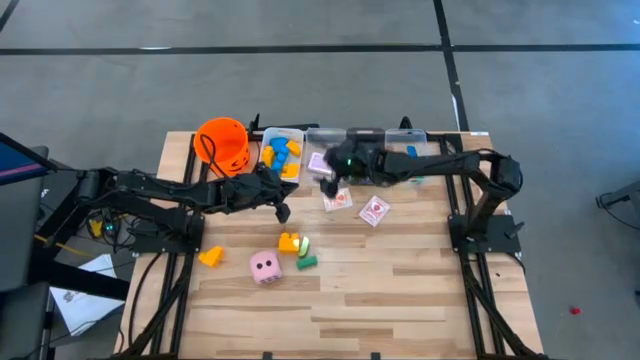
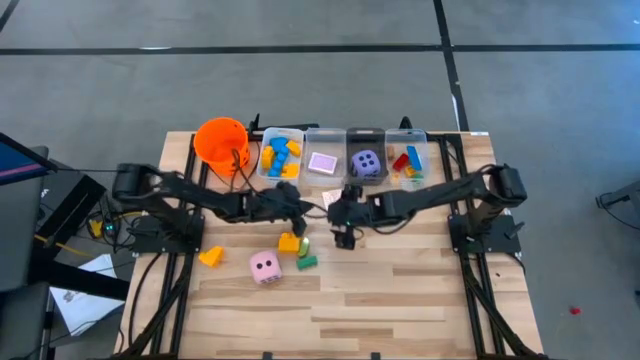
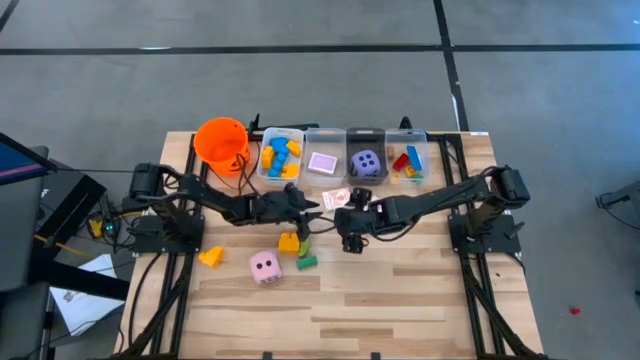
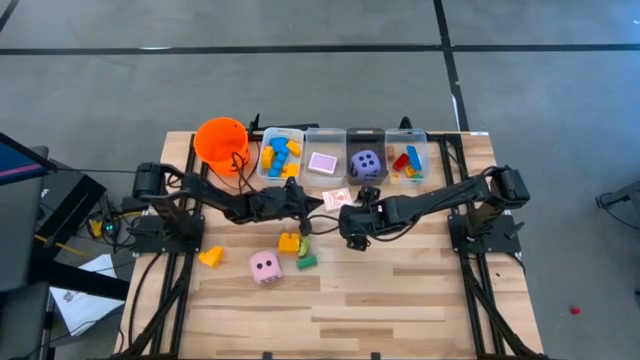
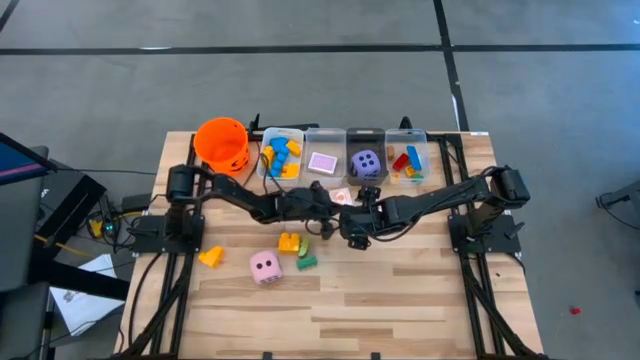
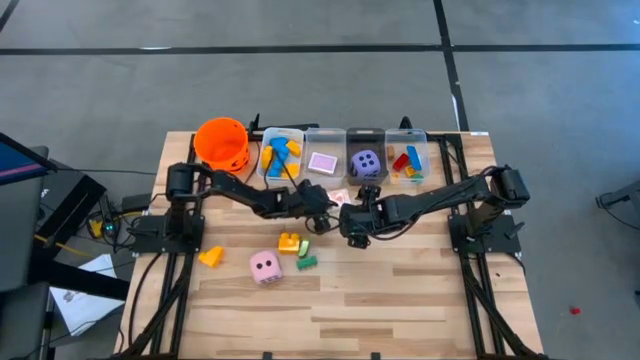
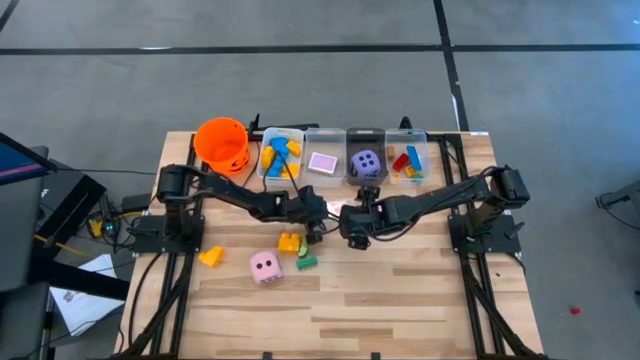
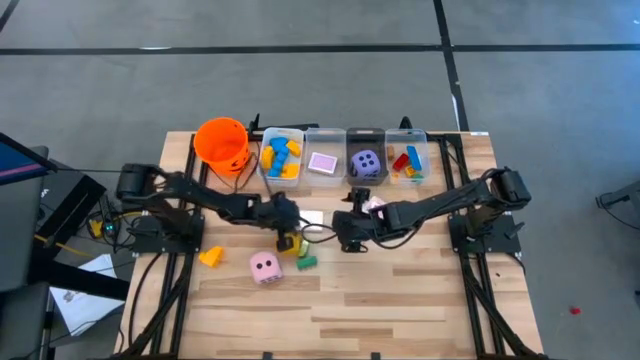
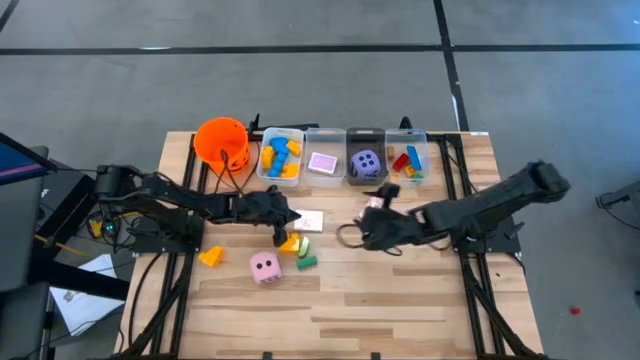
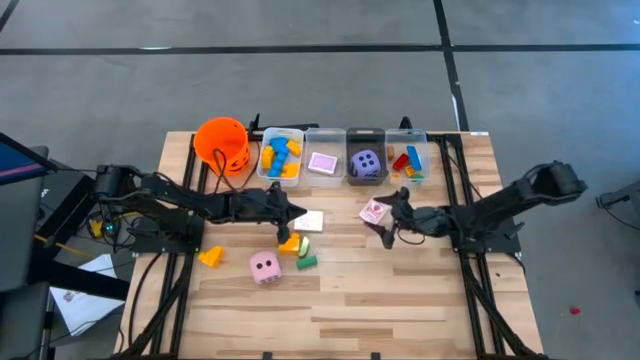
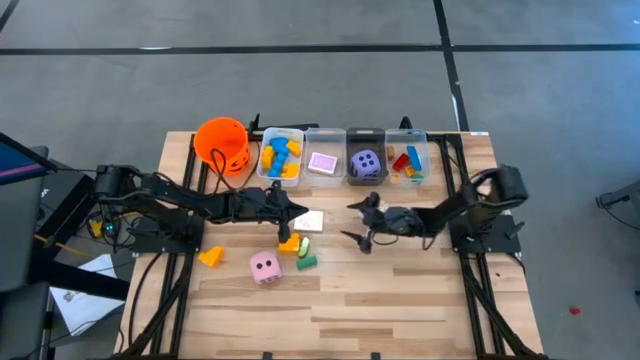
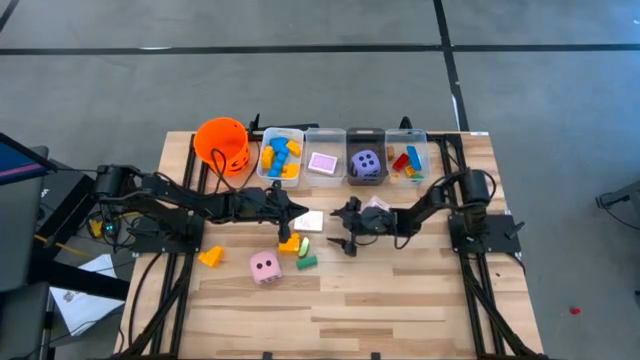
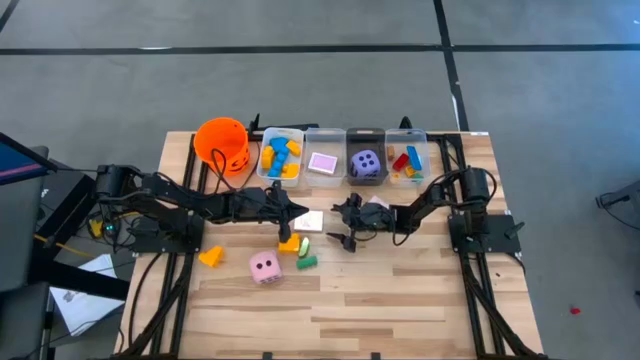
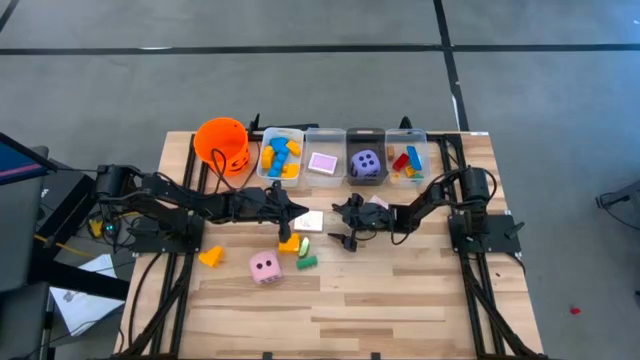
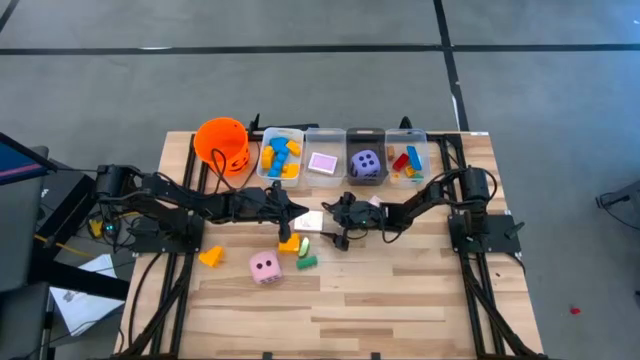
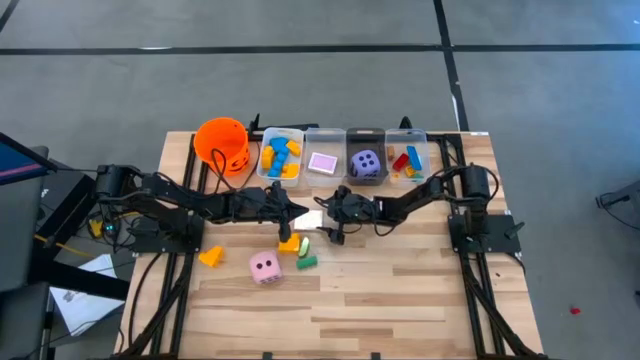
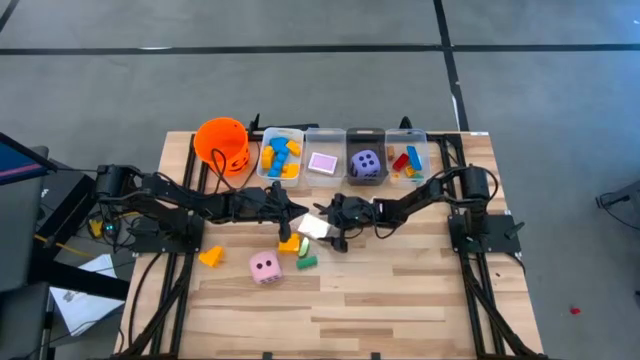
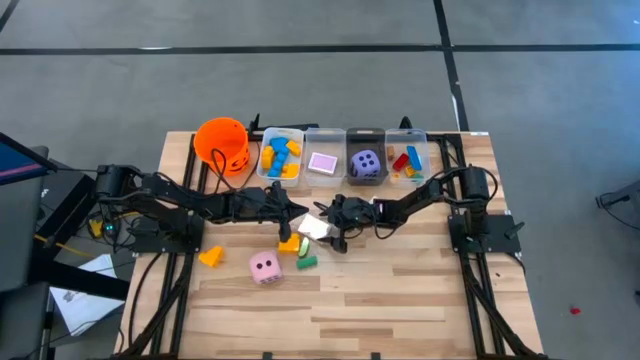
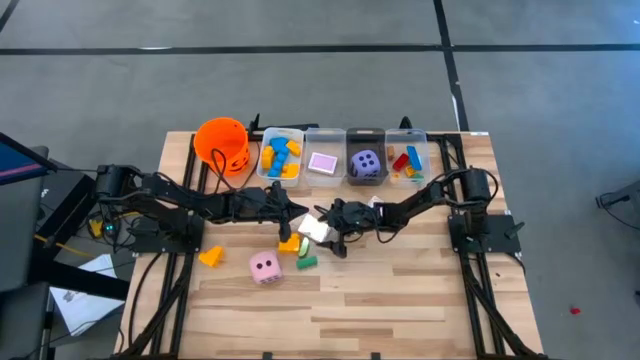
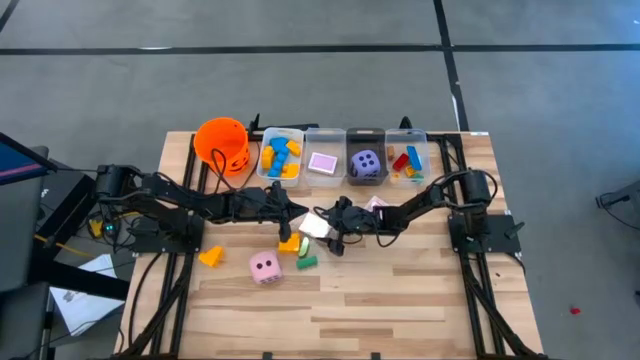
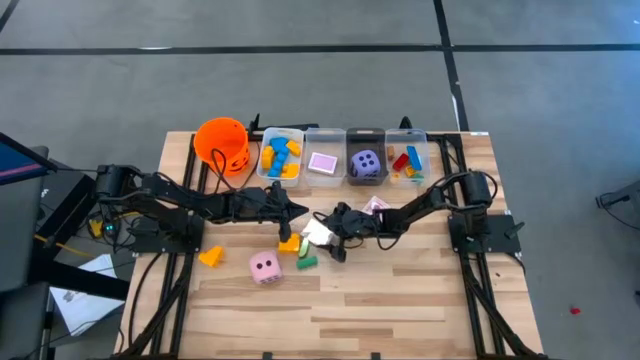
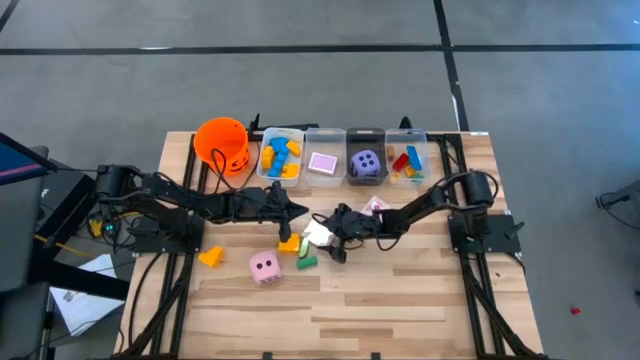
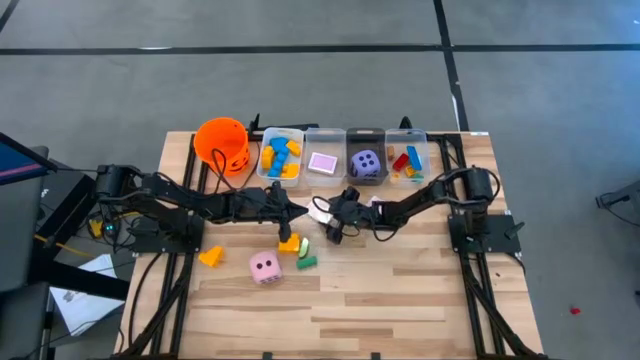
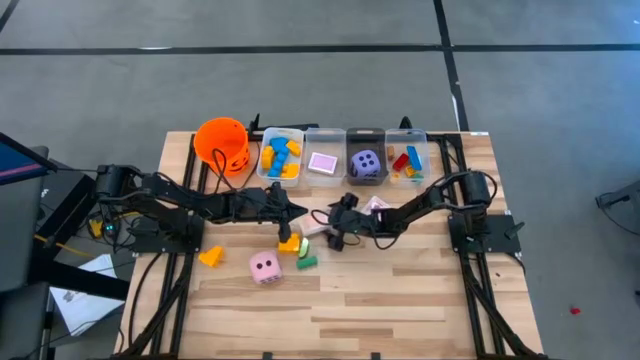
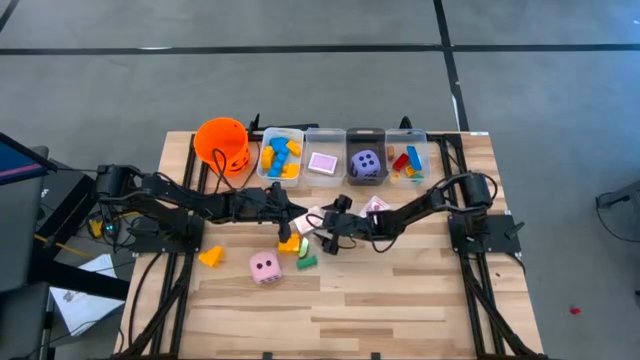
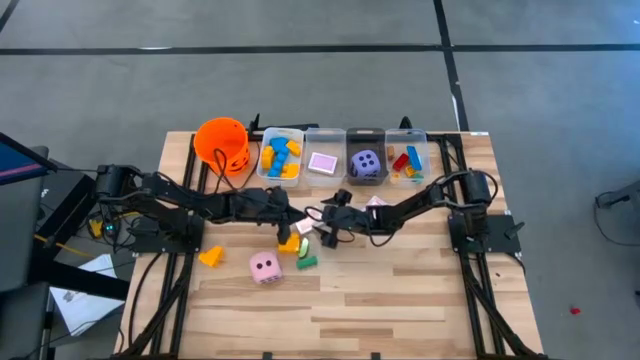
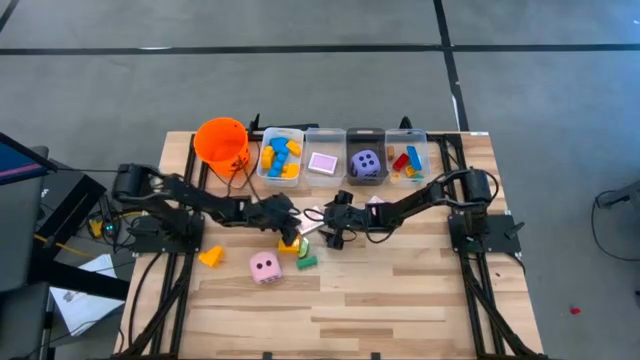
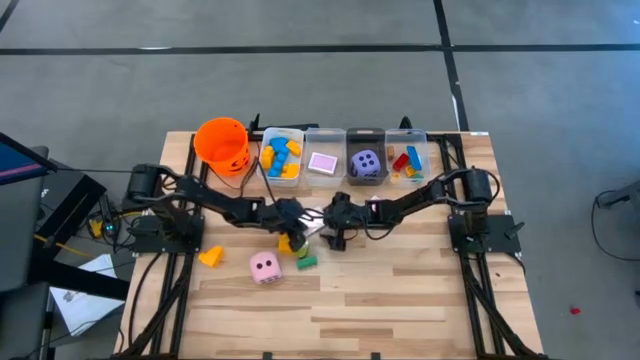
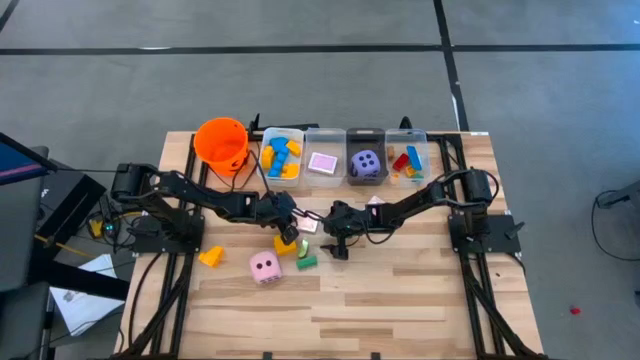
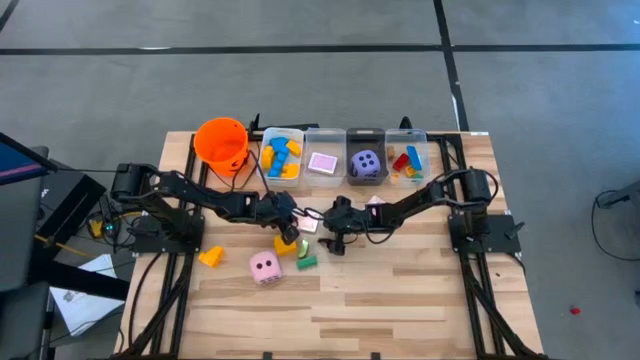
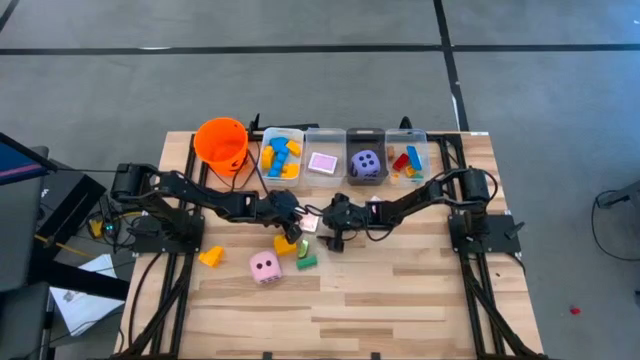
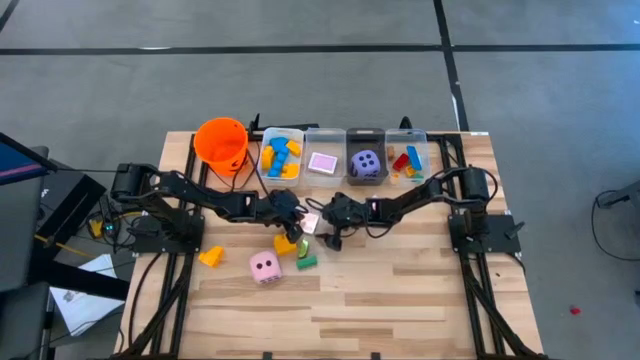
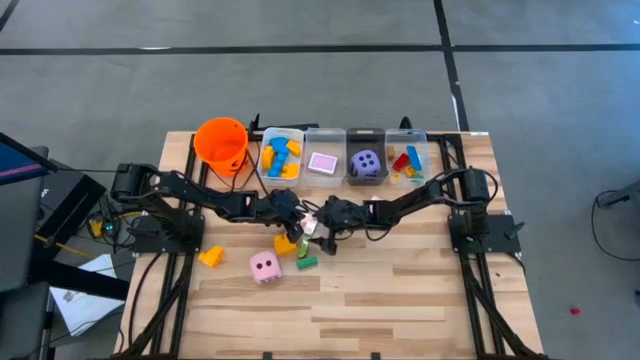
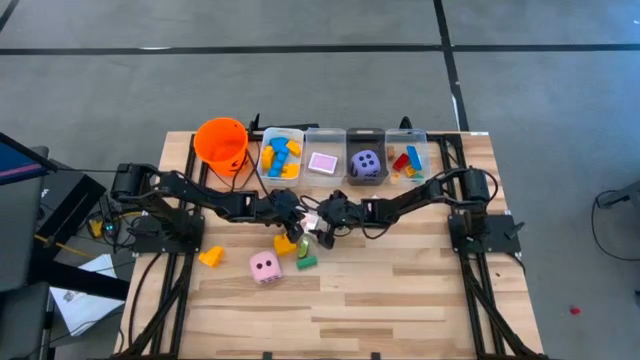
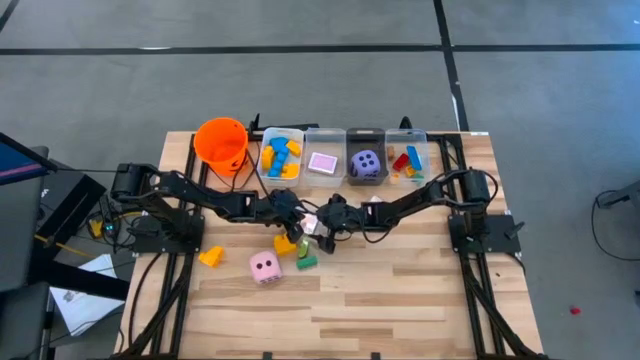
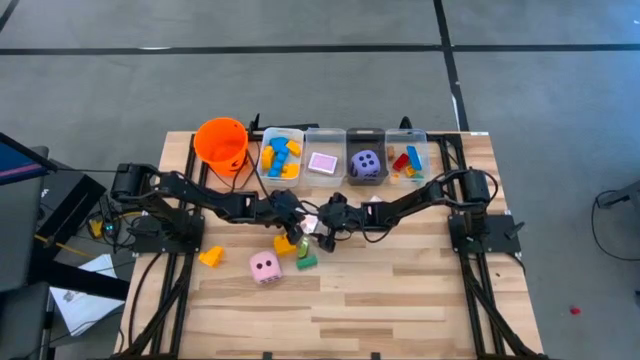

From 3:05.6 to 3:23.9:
Task: Pick & Place Toys
Put the orange deck of cards into the left transparent bin

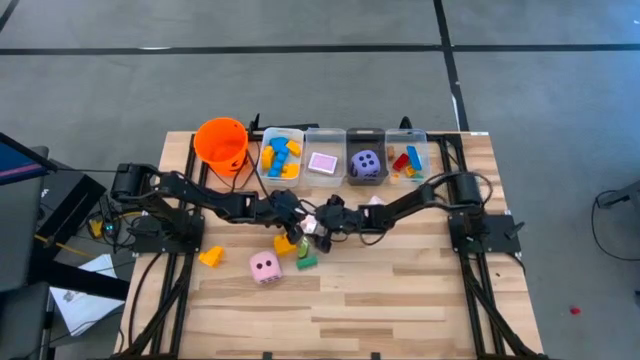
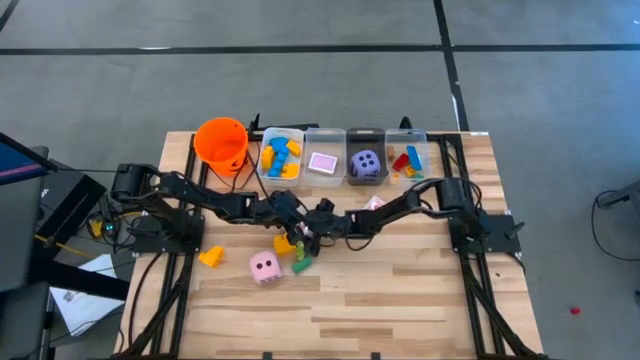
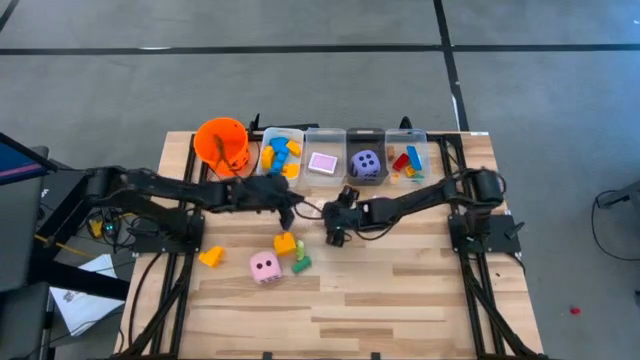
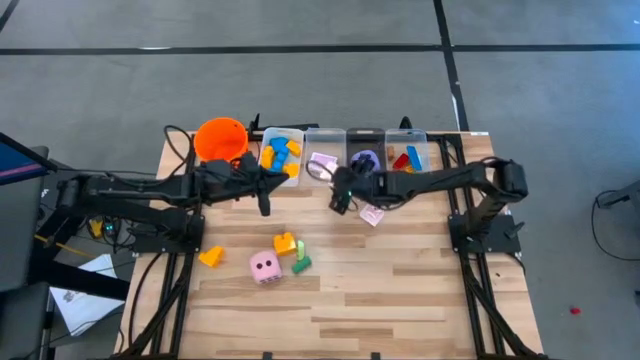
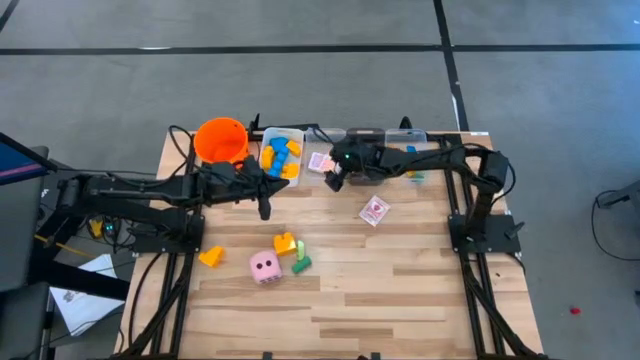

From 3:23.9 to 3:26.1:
Put the orange deck of cards into the left transparent bin

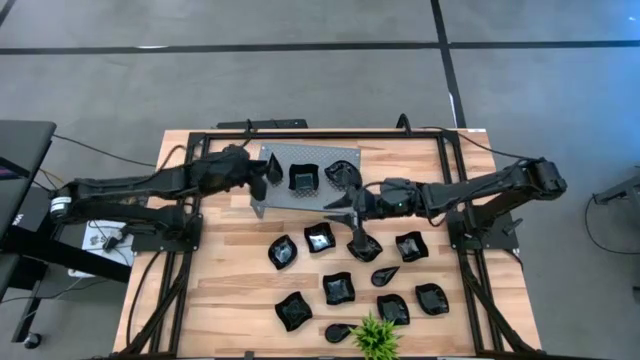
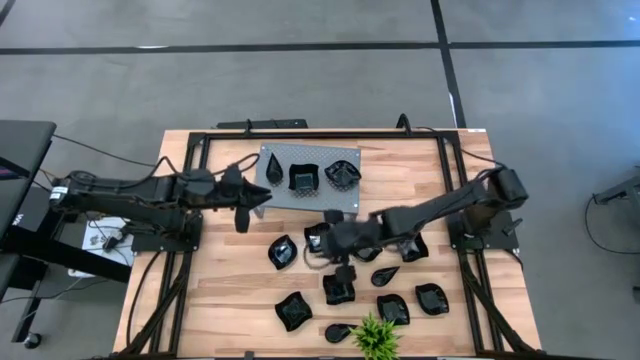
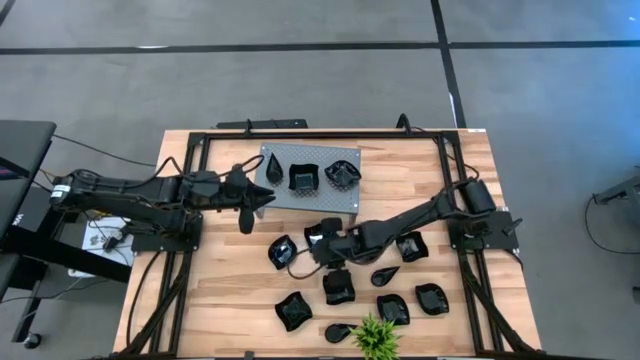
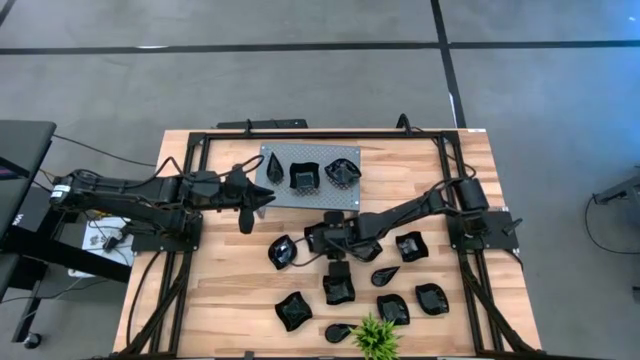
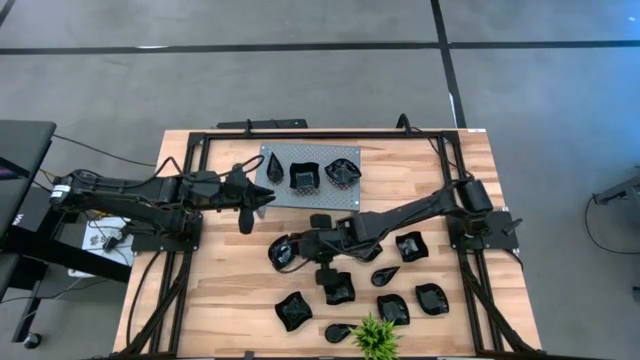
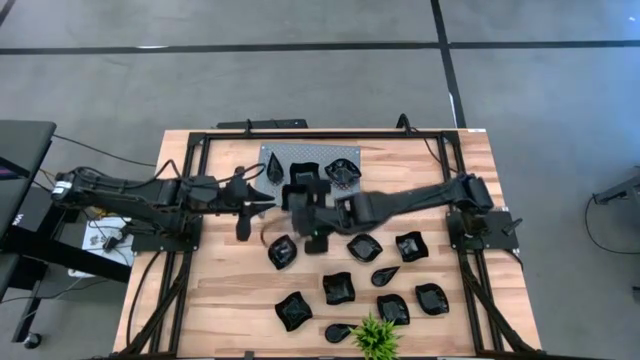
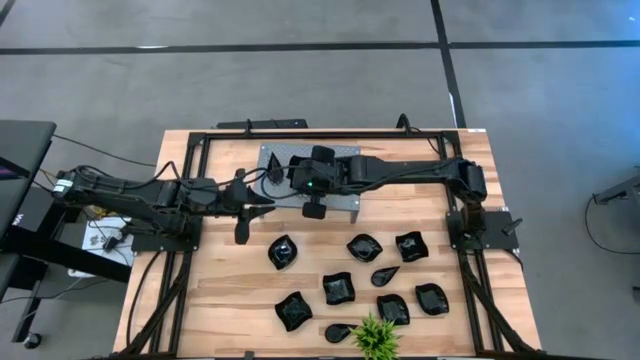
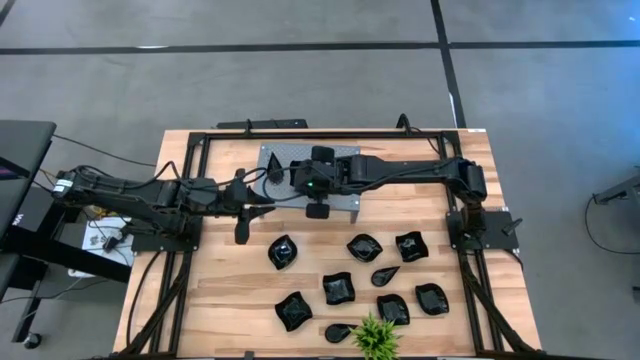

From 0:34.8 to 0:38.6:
Task: Pick & Place Mini shaped plates
Stack the black distorted square plate on top of the black distorted square plate on the shelf
